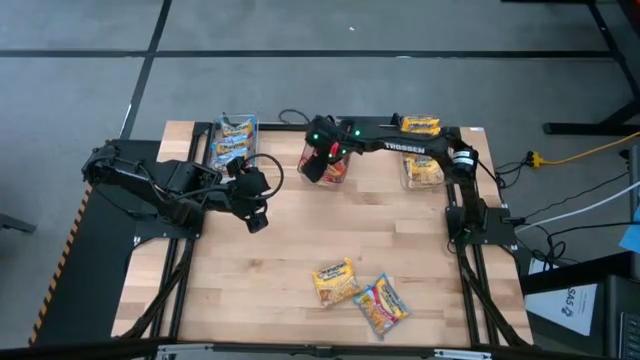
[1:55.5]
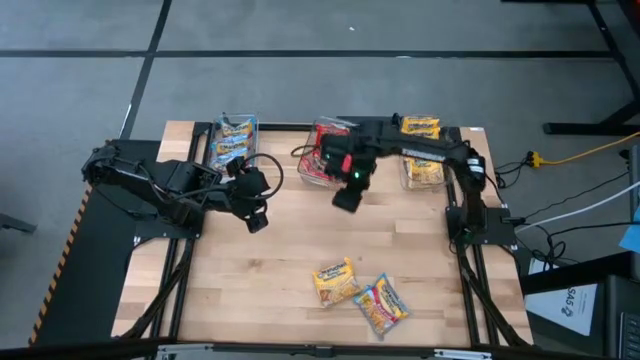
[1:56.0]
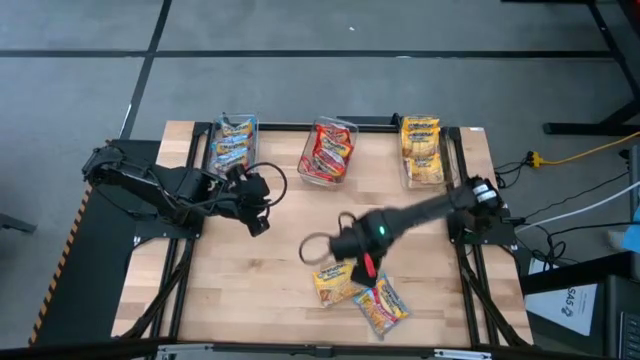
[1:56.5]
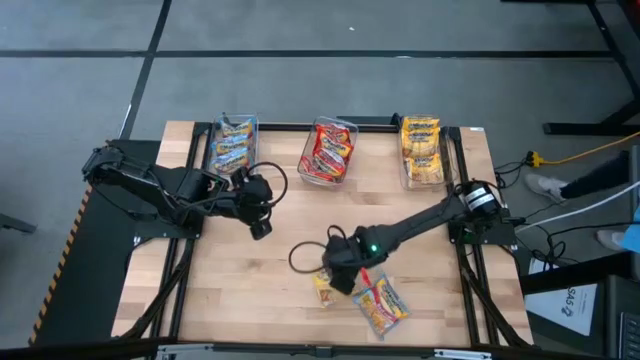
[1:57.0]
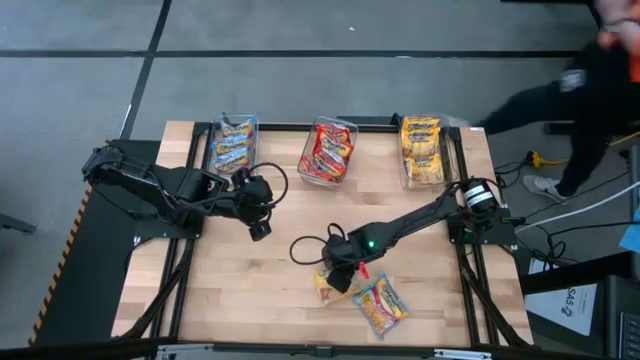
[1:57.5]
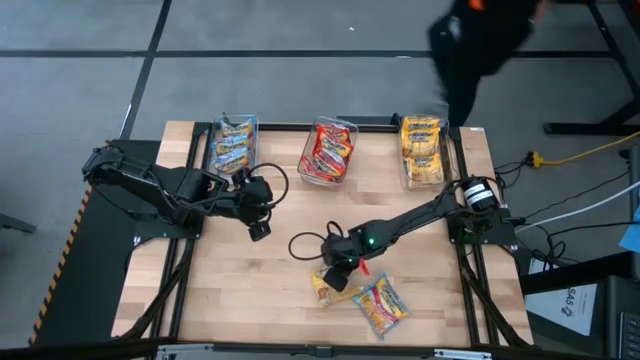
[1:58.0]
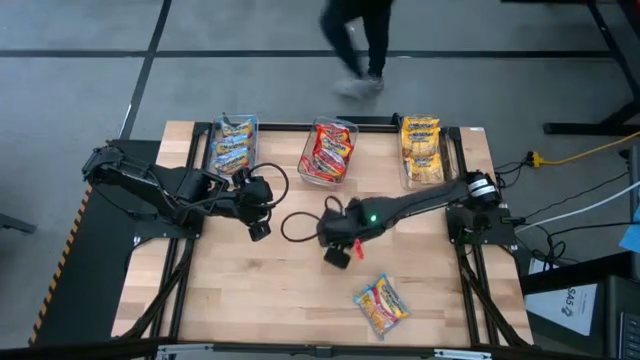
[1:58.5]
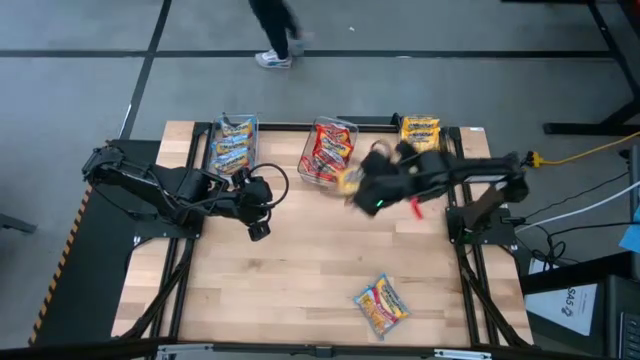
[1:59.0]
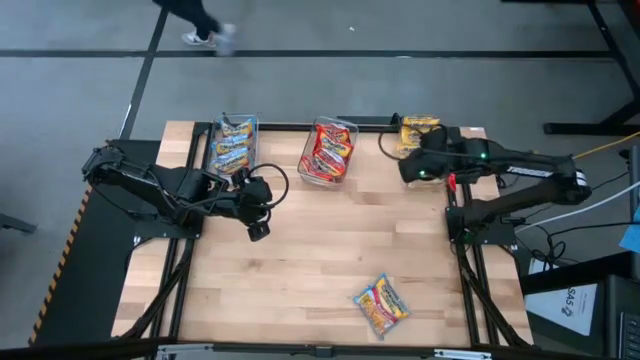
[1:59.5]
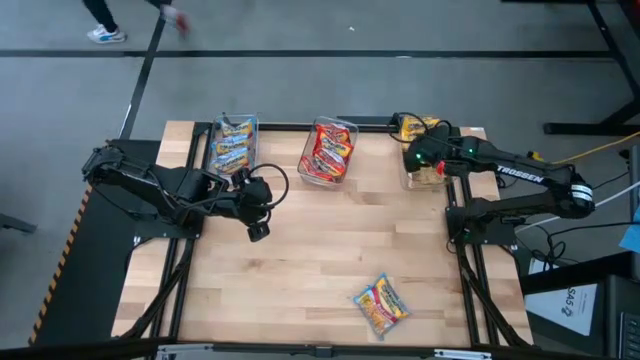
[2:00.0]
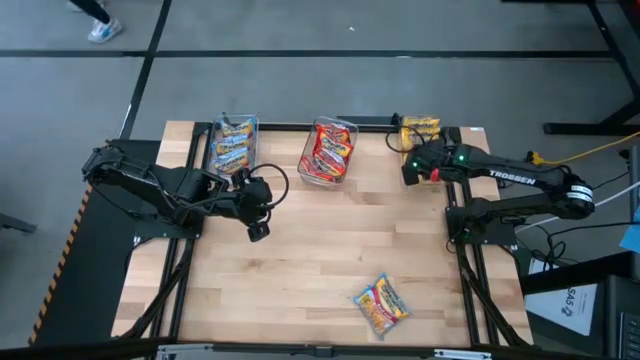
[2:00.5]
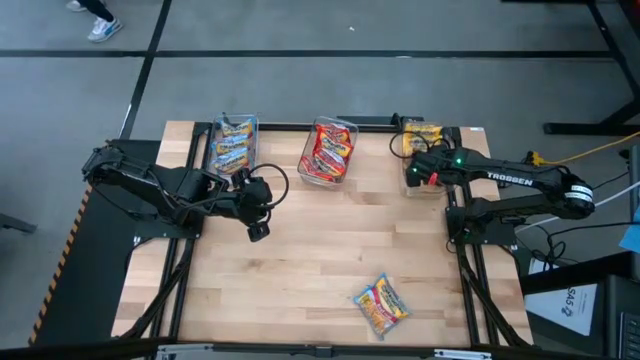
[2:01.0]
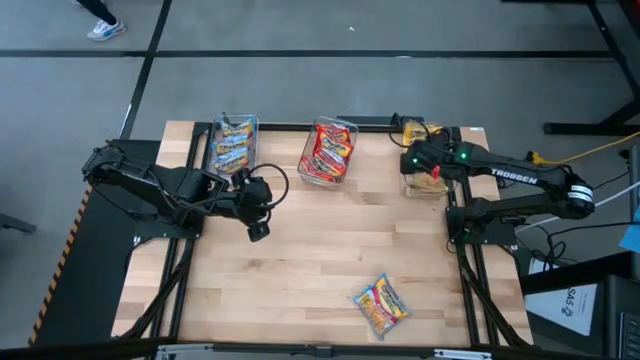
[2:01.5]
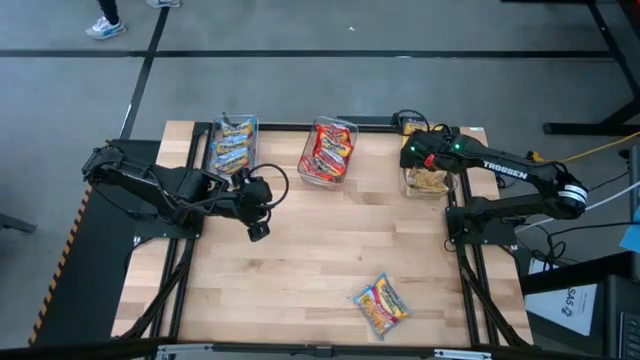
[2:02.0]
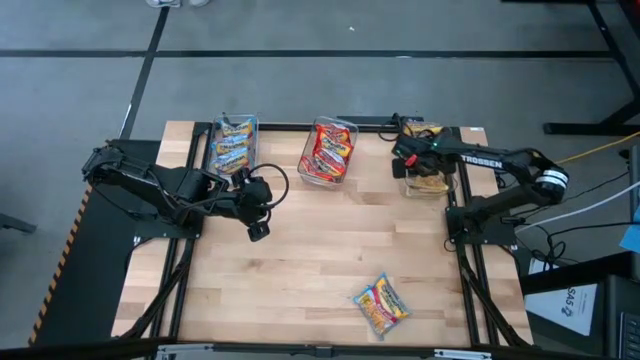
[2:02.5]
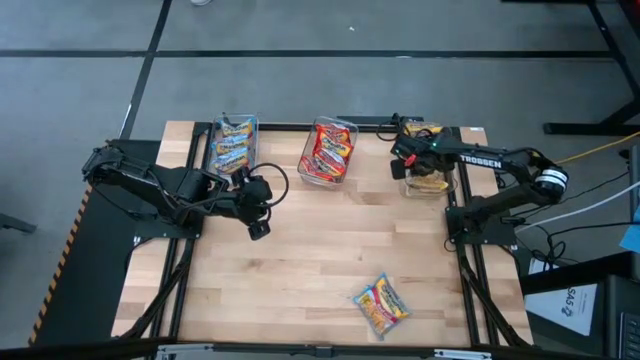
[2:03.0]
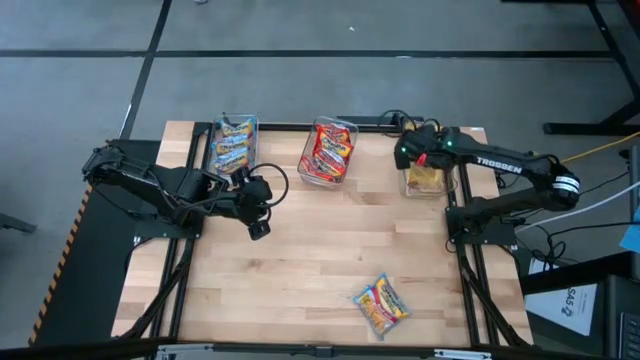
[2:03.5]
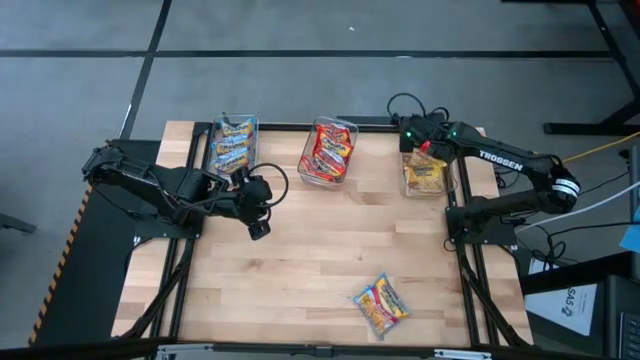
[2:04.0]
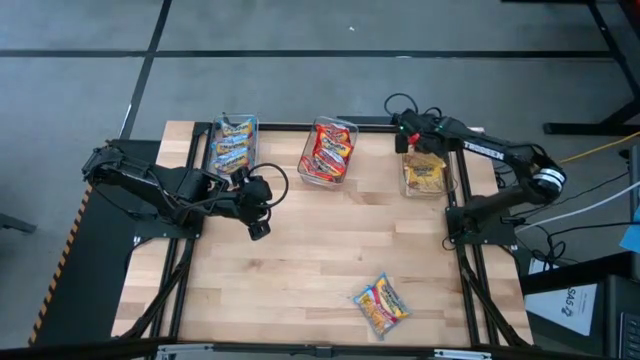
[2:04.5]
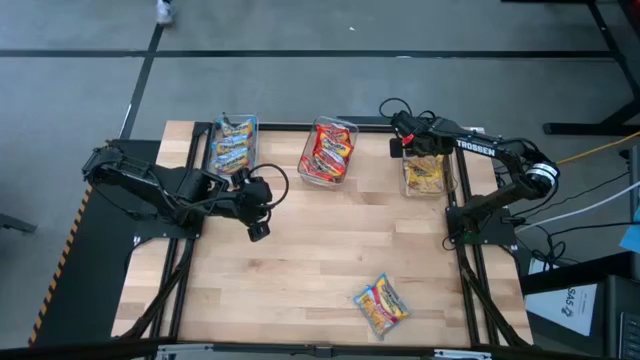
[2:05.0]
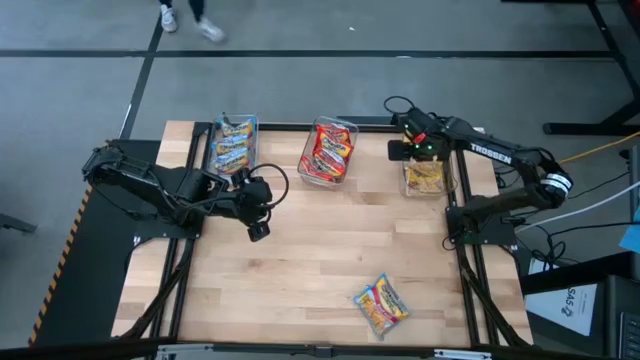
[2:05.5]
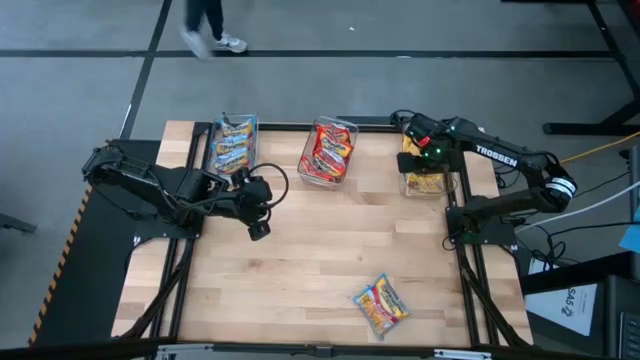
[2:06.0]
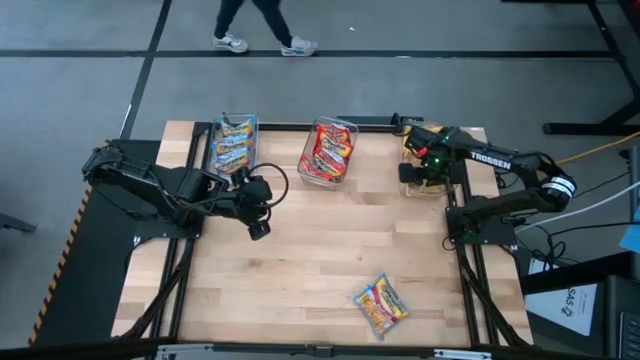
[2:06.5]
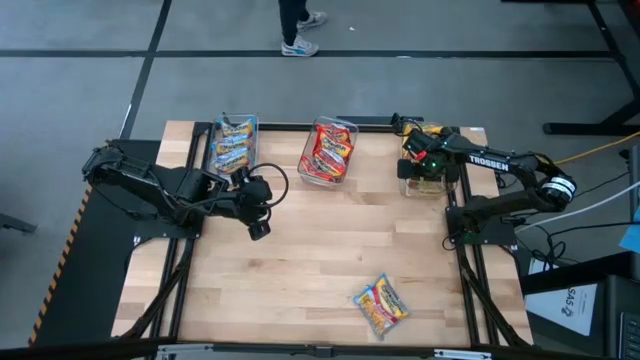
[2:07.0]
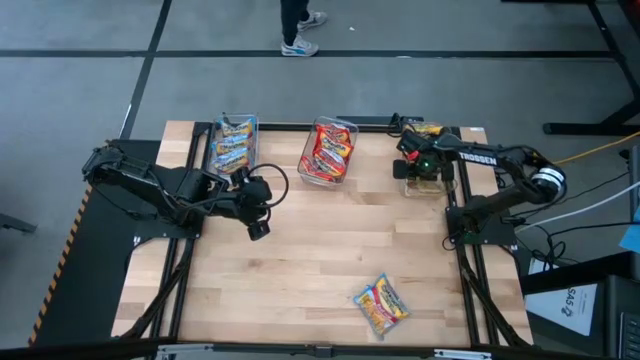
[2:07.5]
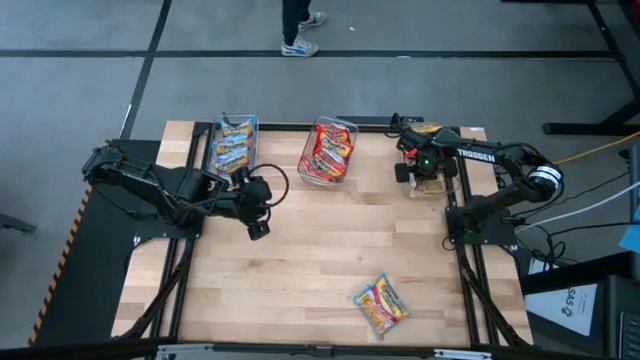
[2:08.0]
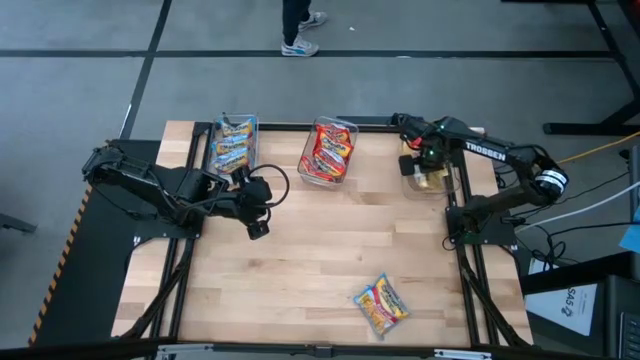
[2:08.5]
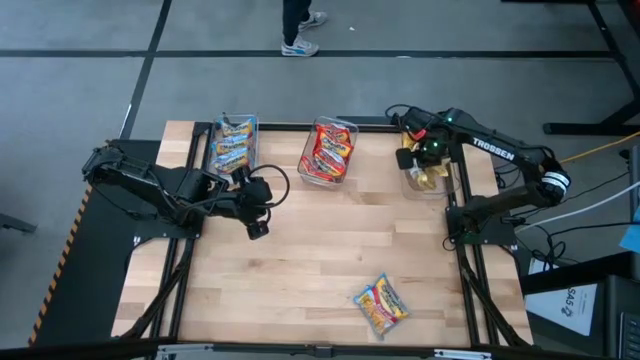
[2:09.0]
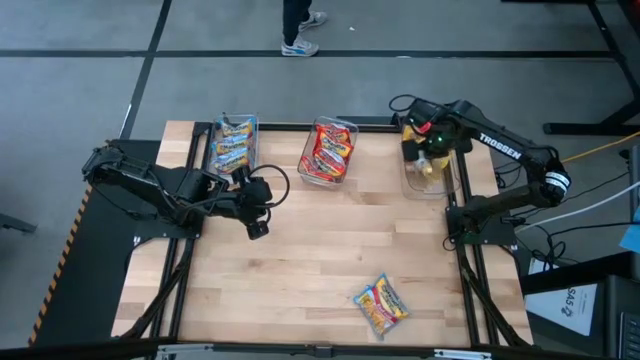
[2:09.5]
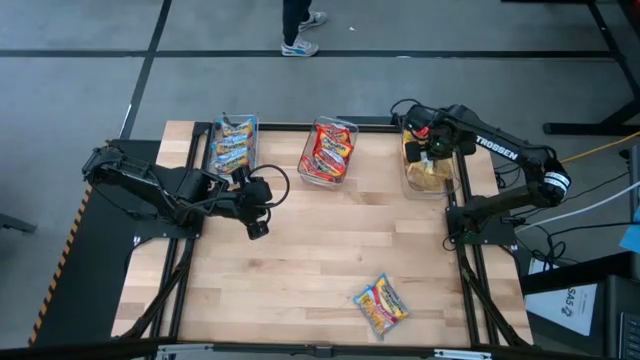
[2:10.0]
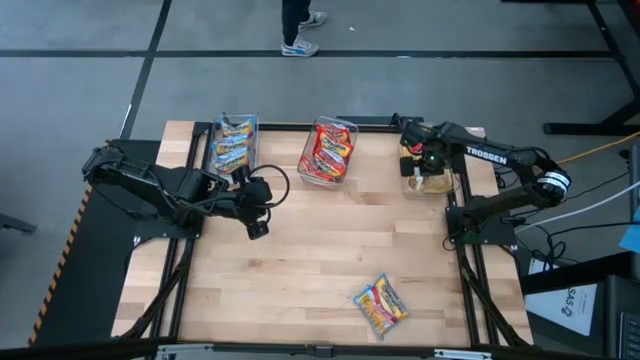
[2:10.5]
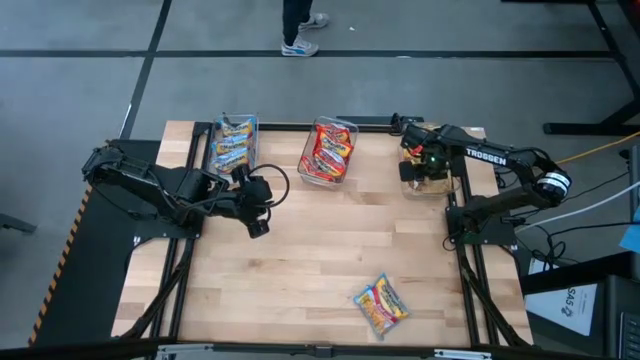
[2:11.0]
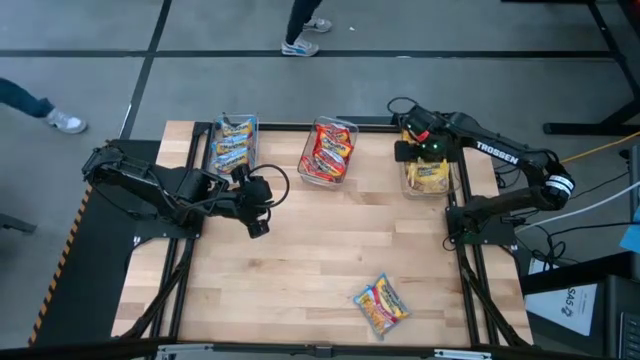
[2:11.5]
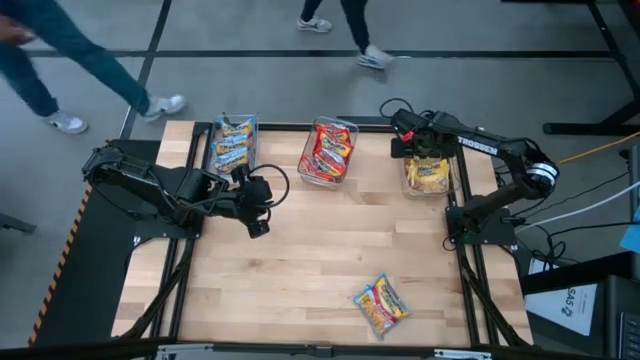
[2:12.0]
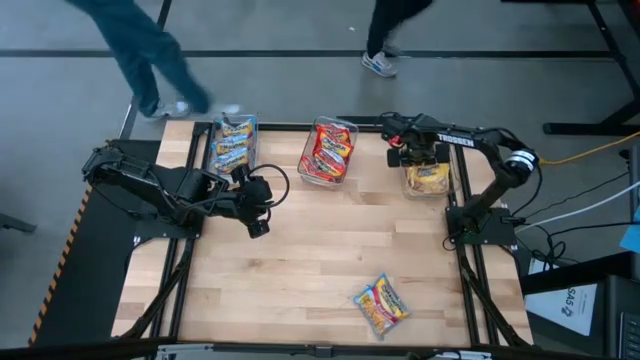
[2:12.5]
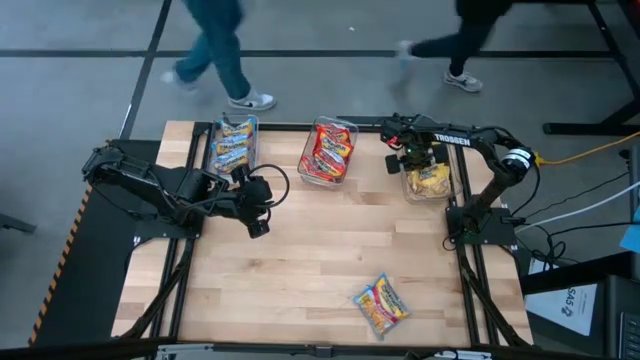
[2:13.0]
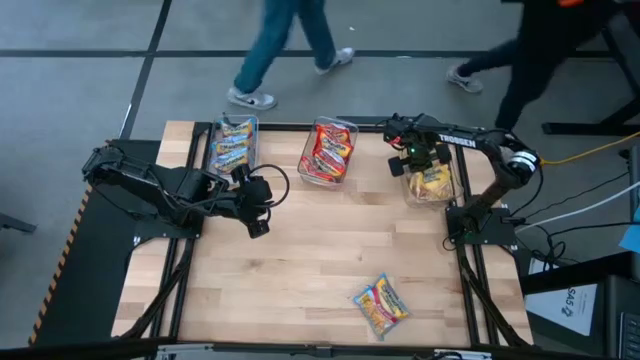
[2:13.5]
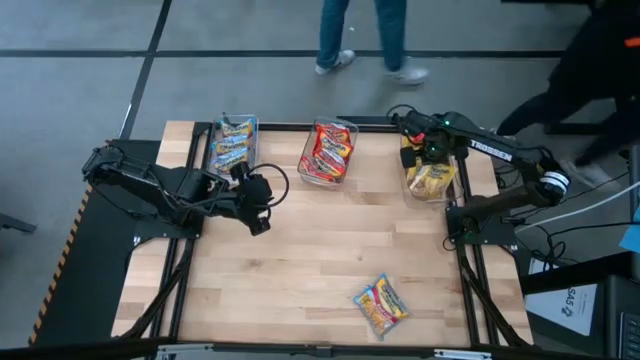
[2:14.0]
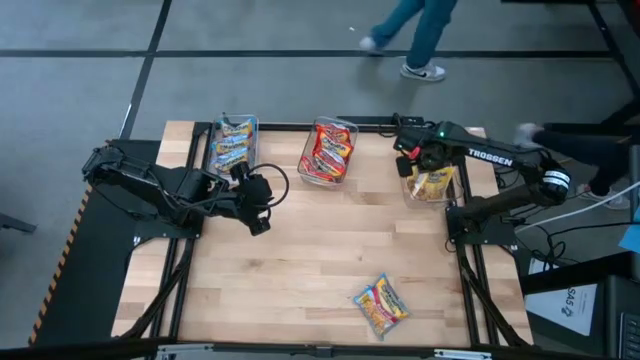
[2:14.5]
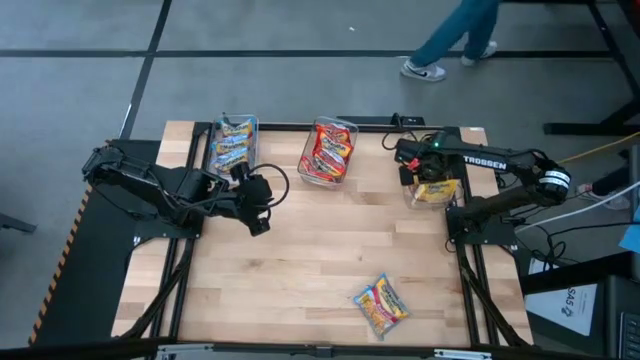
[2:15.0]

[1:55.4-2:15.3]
Task: Sort Maruchan noodles
Put the yellow noodle pack in the right transparent basket

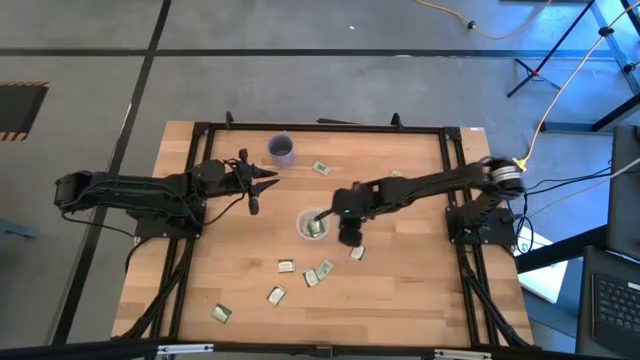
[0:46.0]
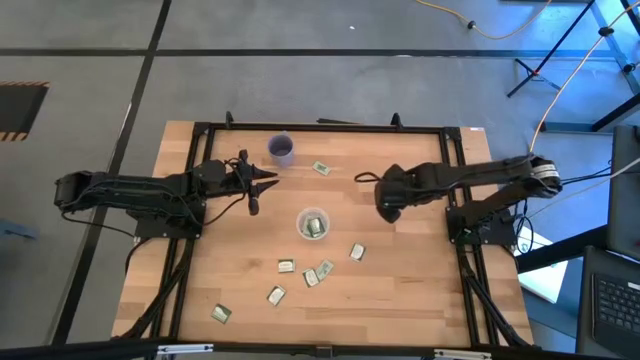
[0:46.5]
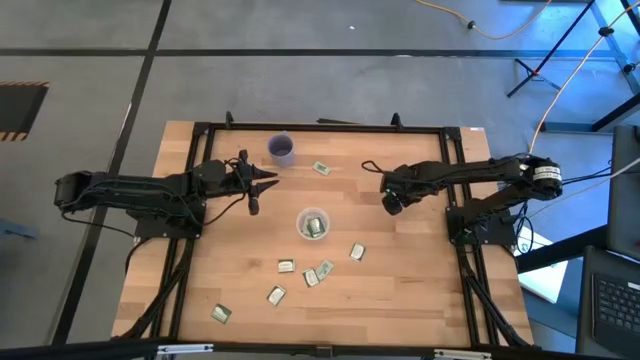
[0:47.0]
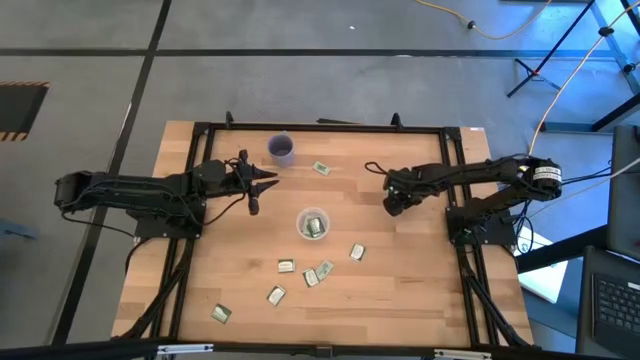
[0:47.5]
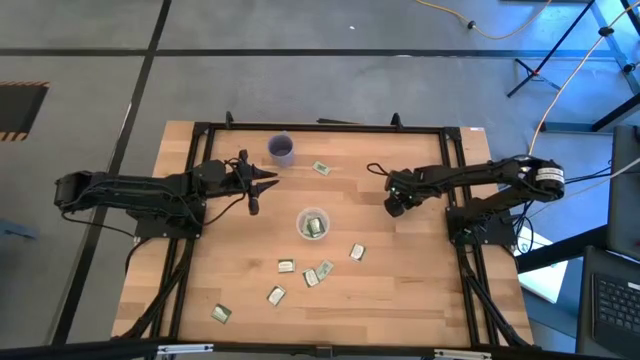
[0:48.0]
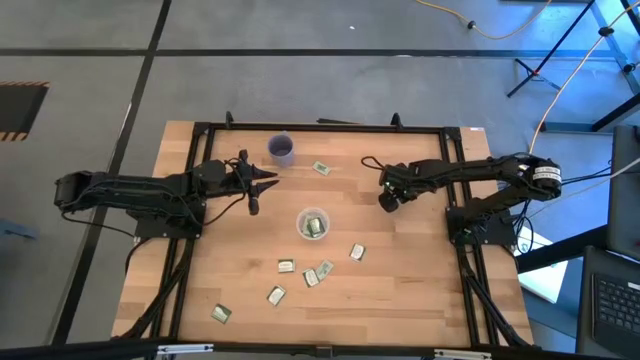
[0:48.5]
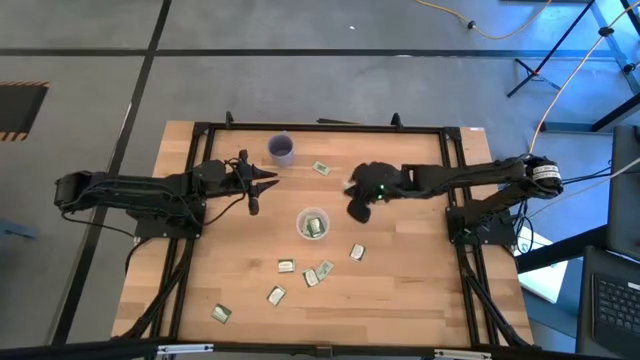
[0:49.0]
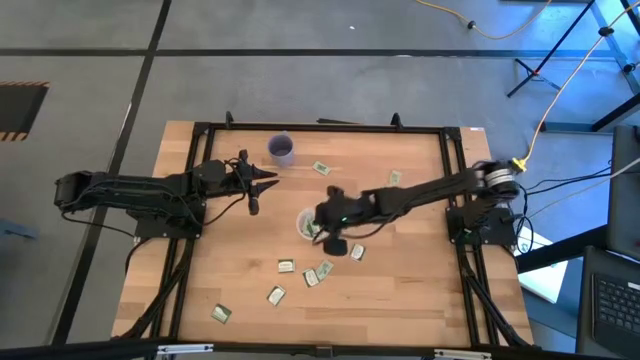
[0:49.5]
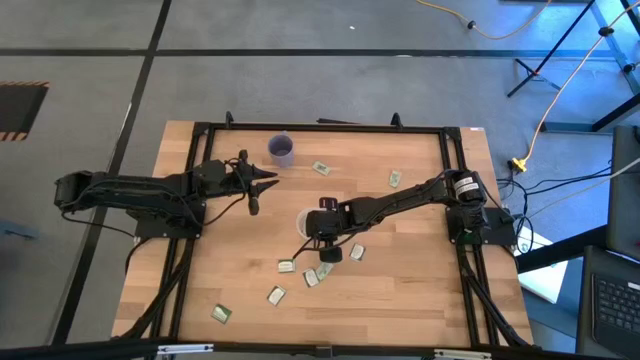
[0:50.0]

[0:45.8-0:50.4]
Task: Pick and place Stevia / Truvia into bins
Put the stevia packet into the transparent container
